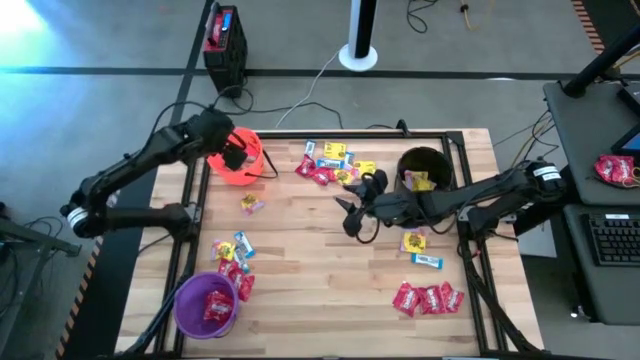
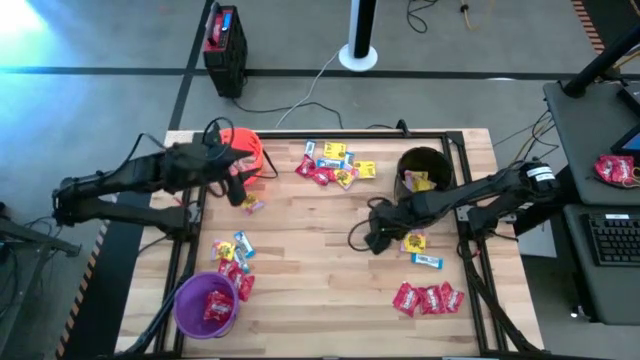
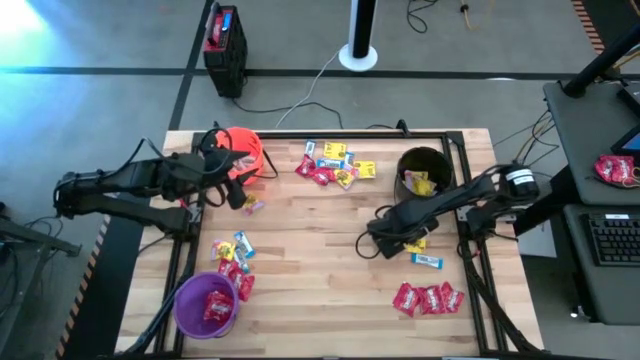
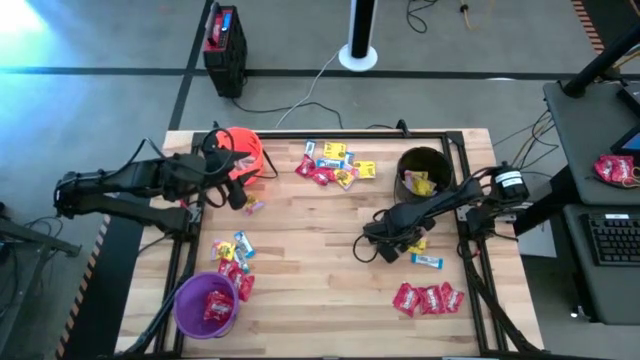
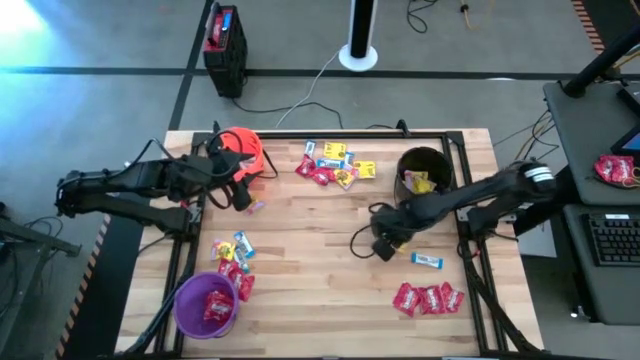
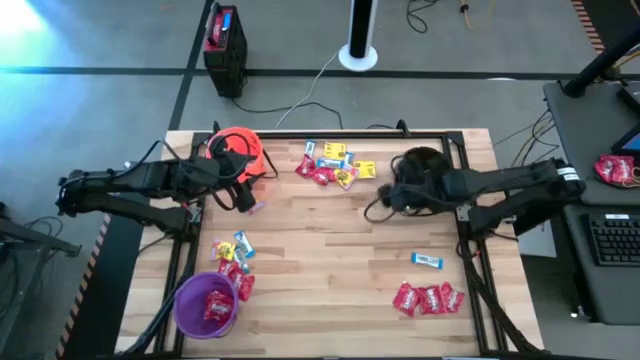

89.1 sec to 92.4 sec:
Task: Sort candy by brand, put in halloween buckets
Put the yellow candy into the black bucket

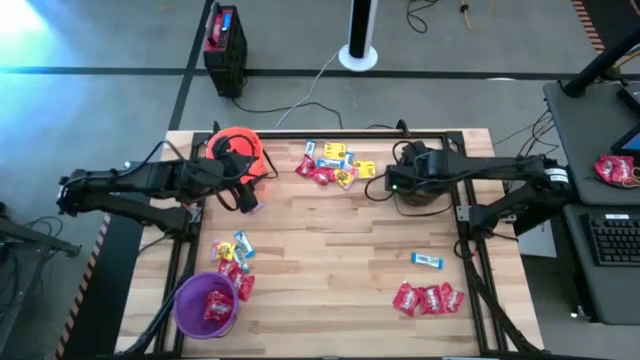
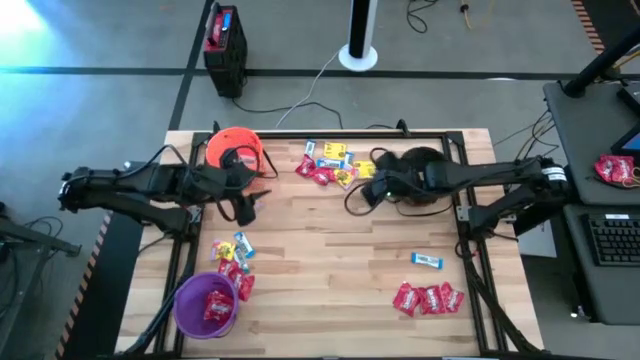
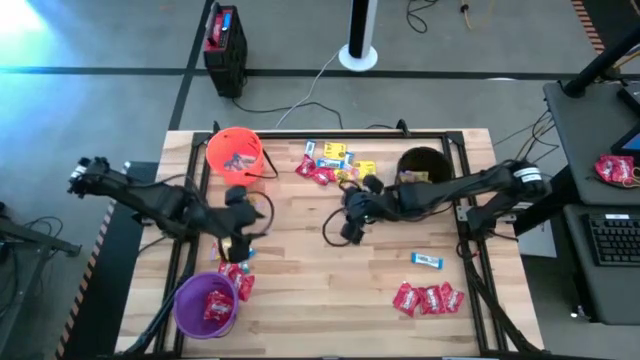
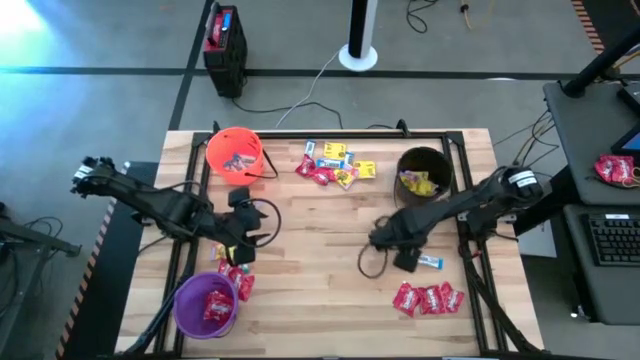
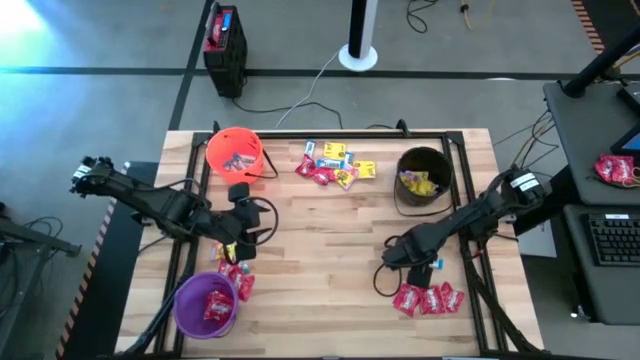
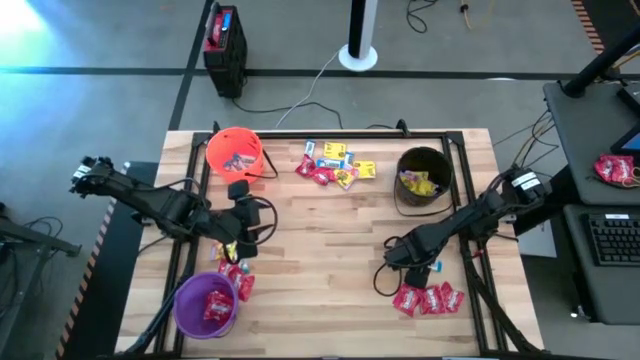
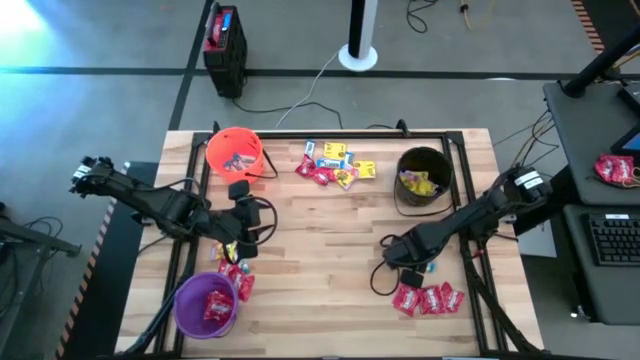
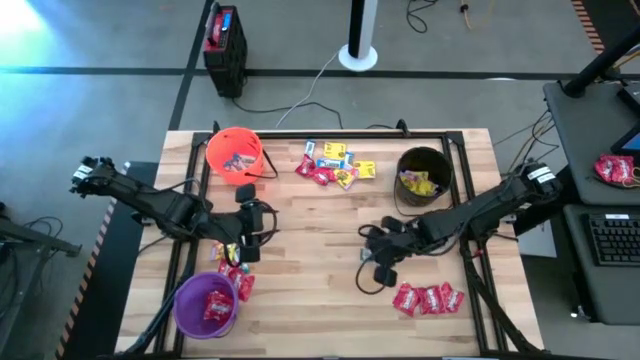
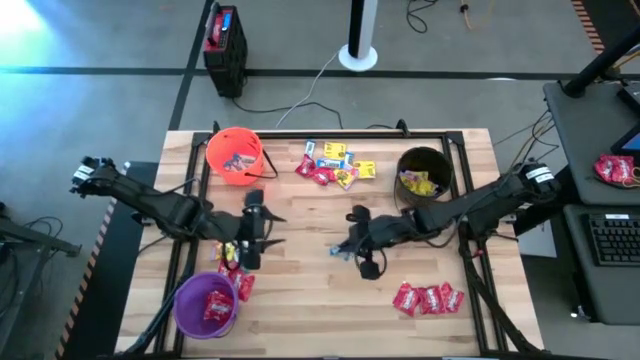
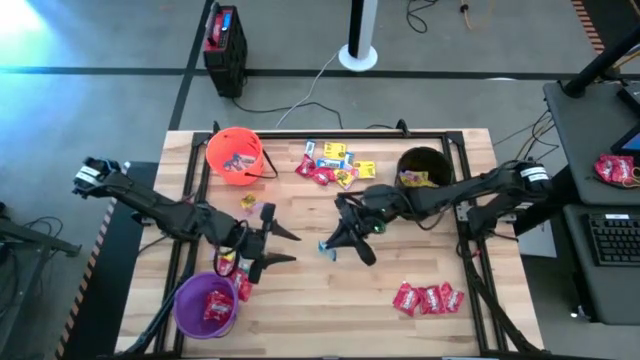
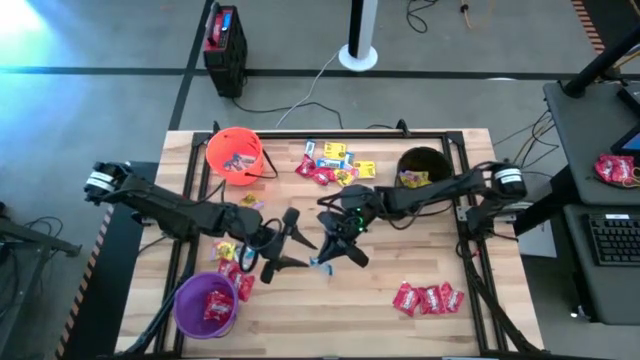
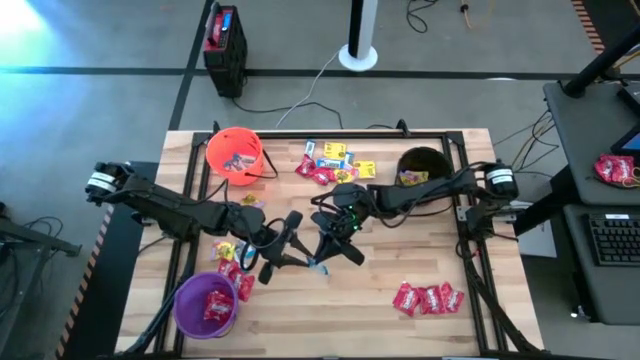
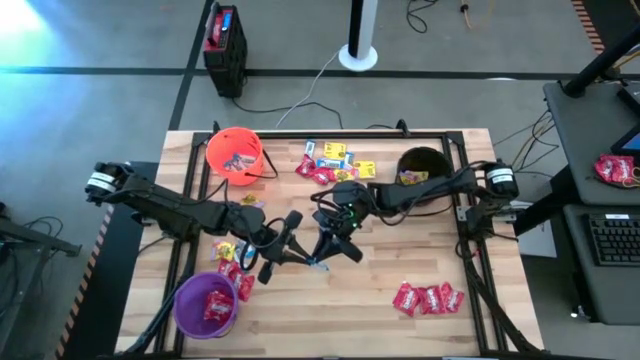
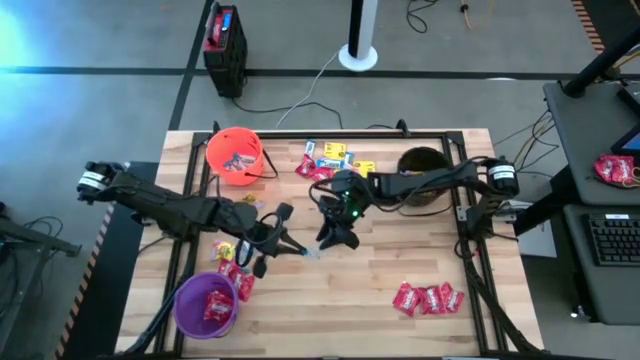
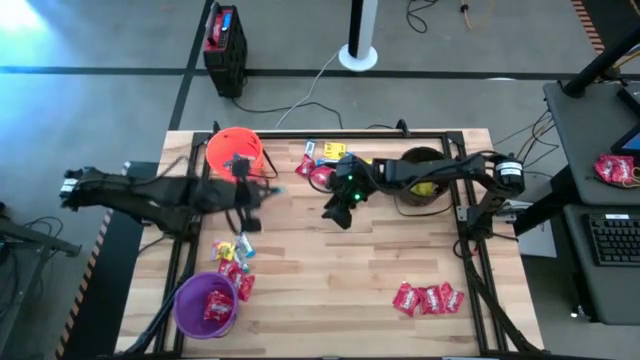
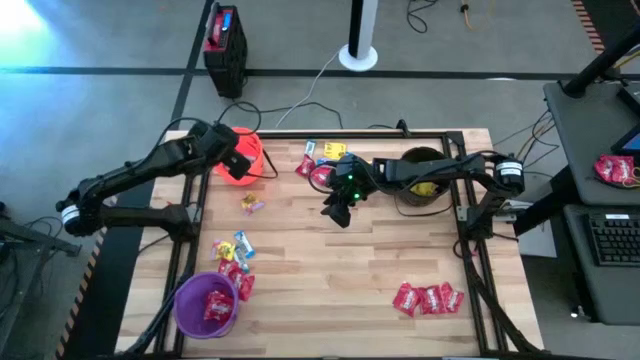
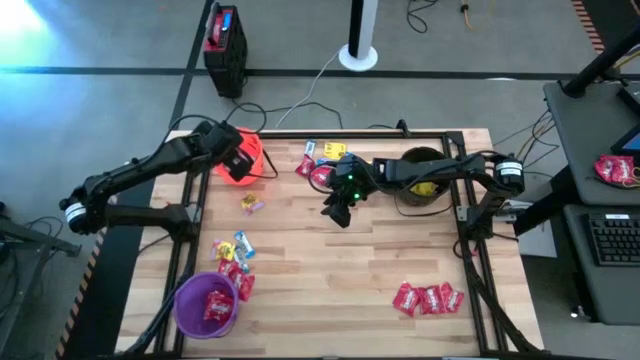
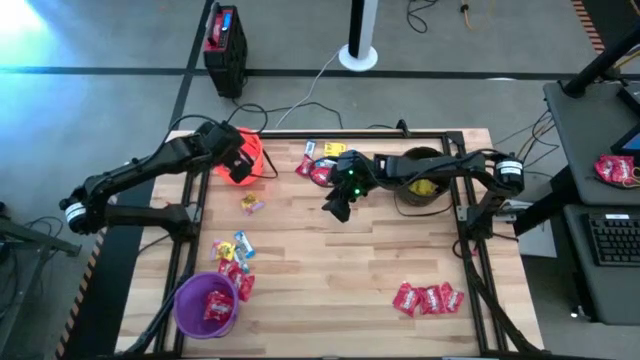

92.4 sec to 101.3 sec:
Put the white chocolate bar into the orange bucket

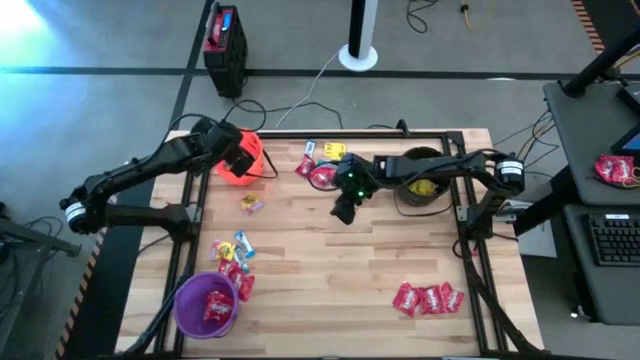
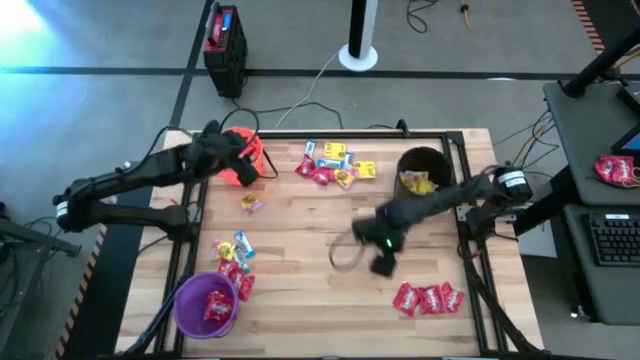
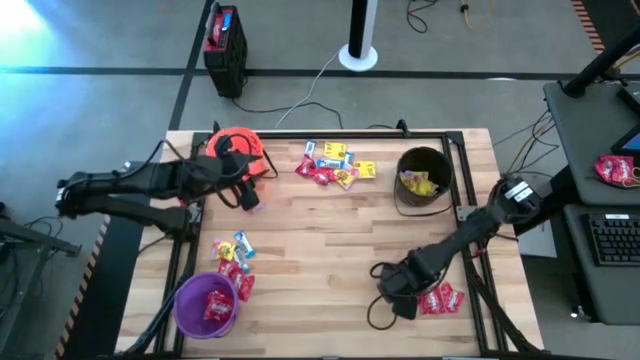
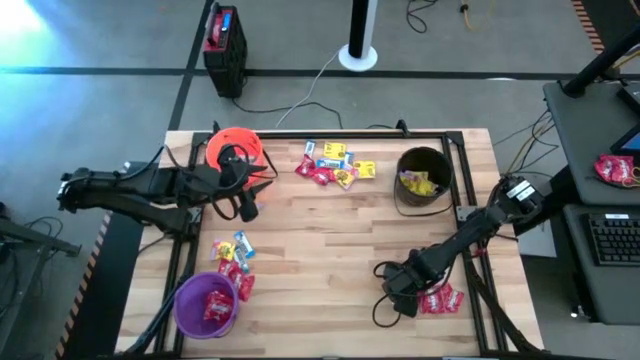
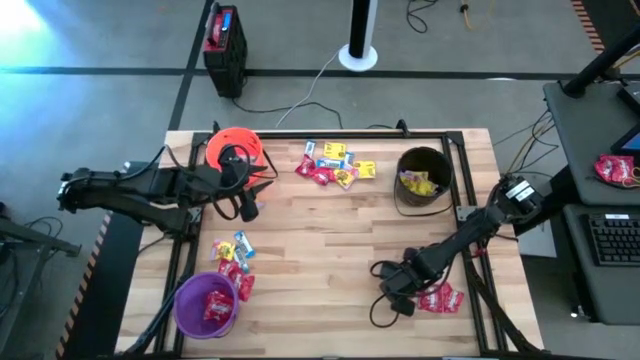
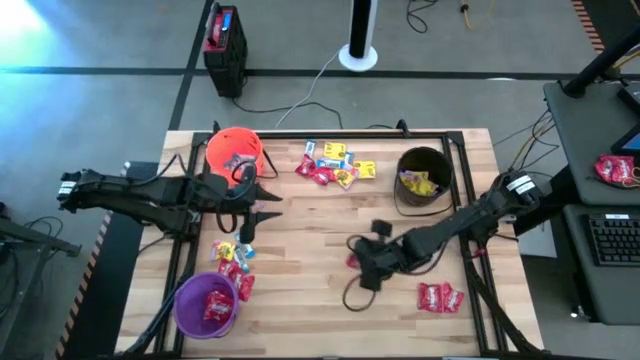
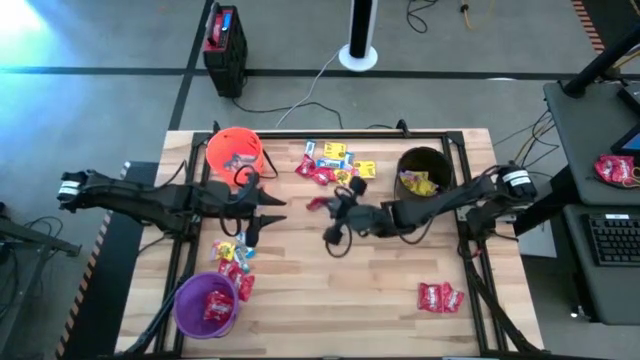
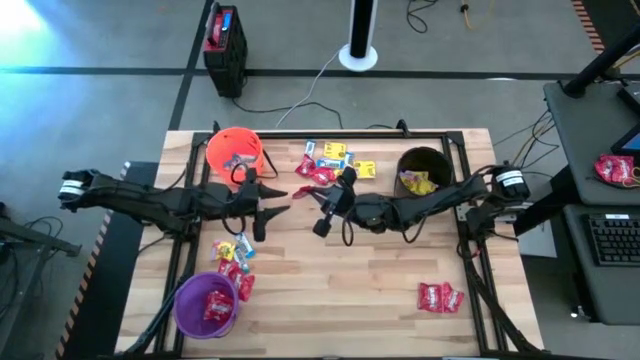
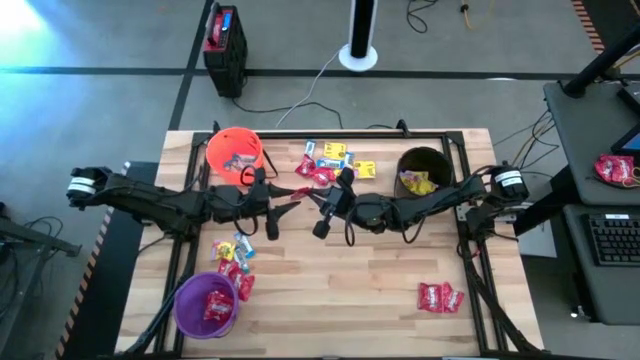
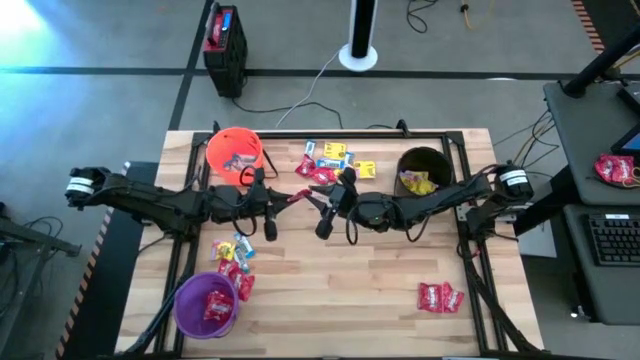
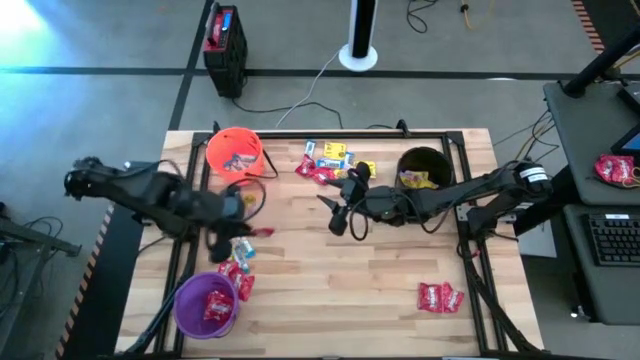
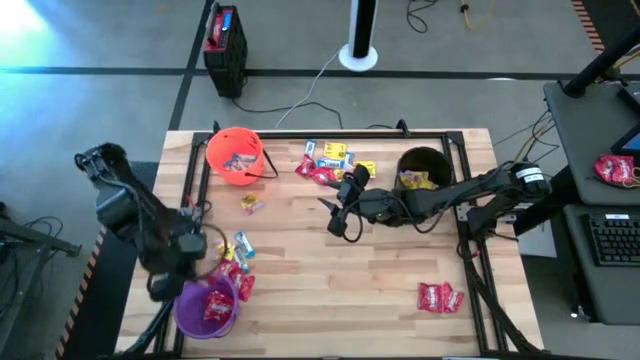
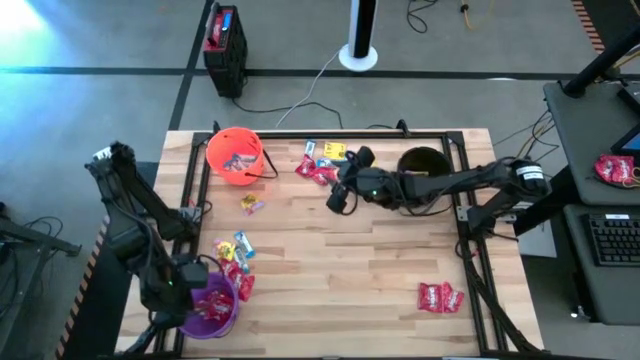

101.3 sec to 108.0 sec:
Put the red candy into the purple bucket

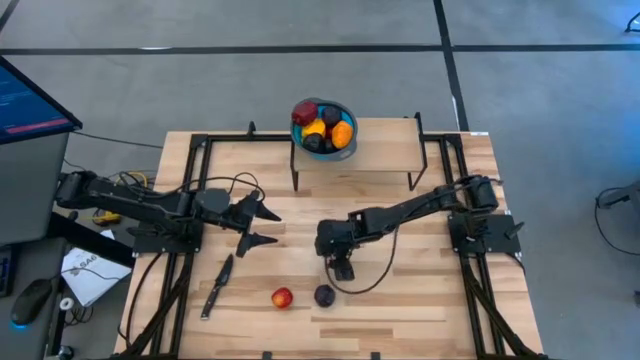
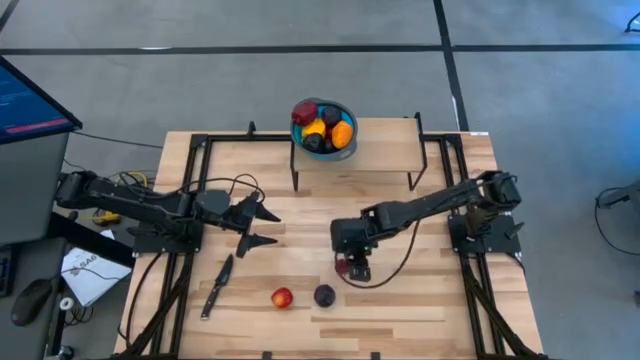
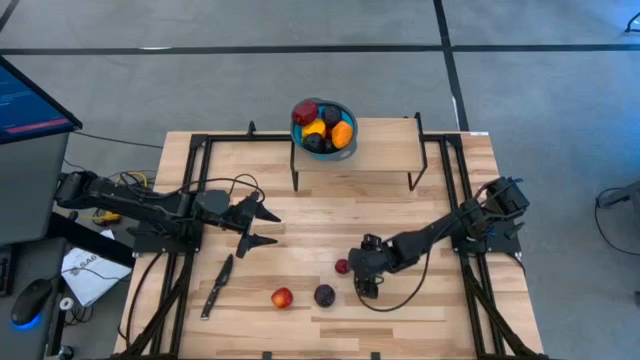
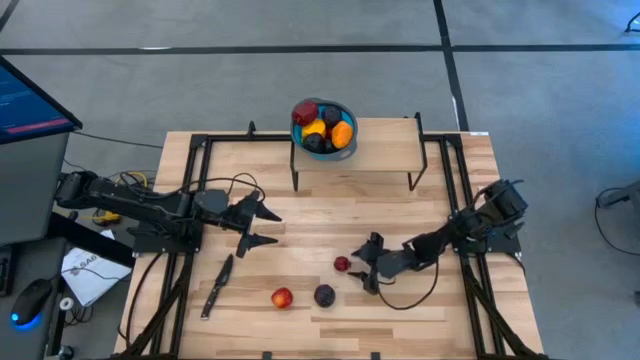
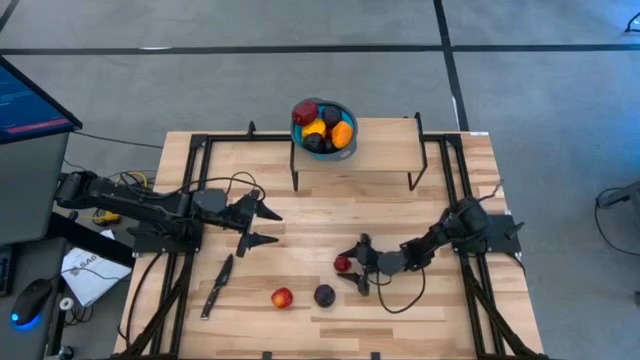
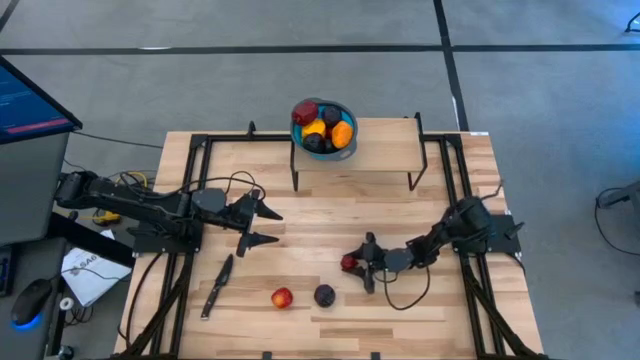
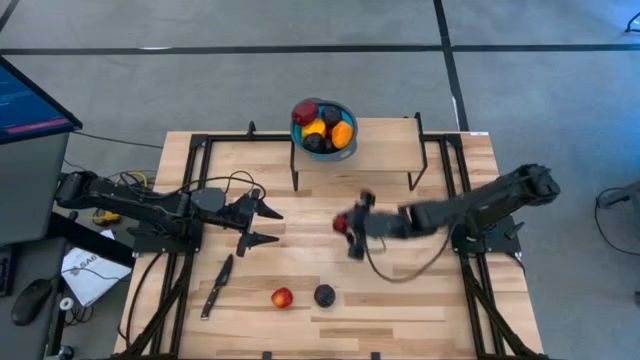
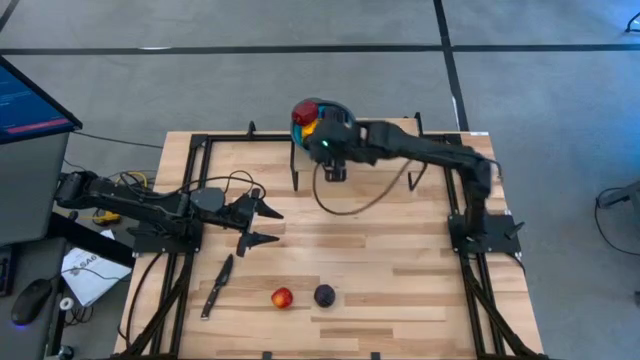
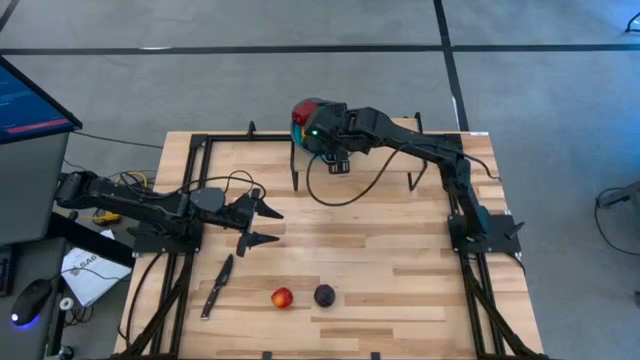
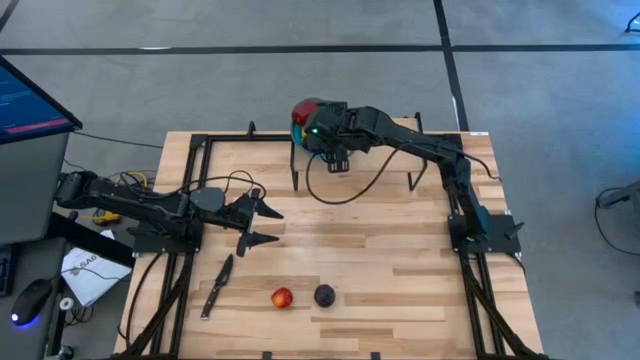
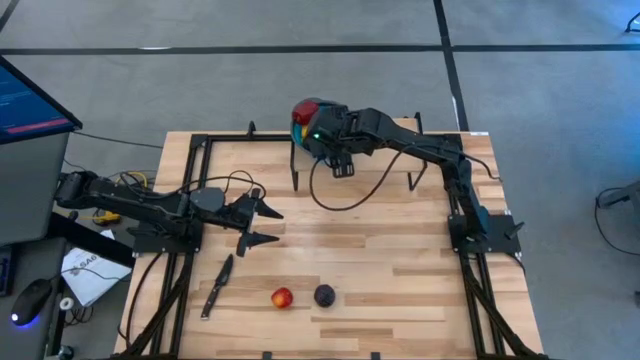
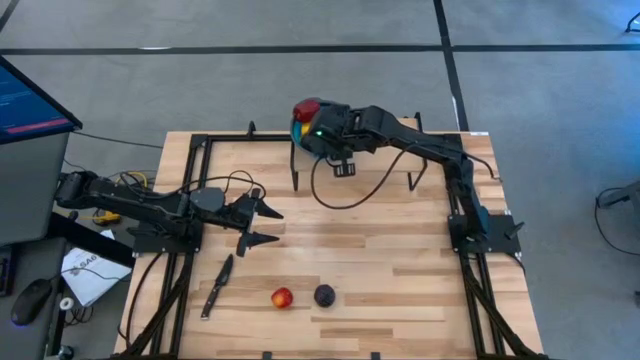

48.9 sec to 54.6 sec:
Task: Pick & Place Fruit
Put the red pomegranate into the blue strainer bowl on the shelf
